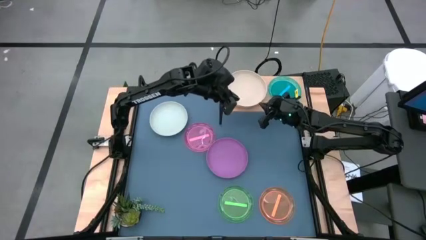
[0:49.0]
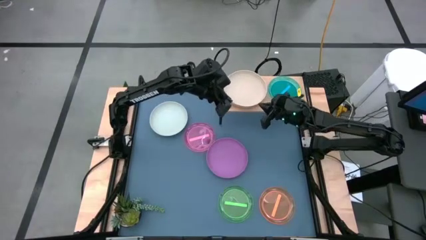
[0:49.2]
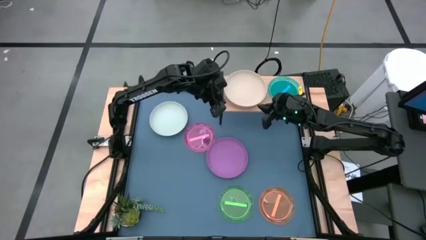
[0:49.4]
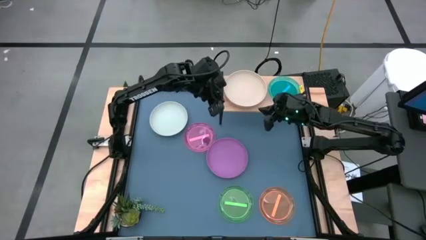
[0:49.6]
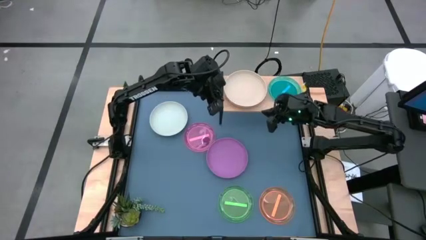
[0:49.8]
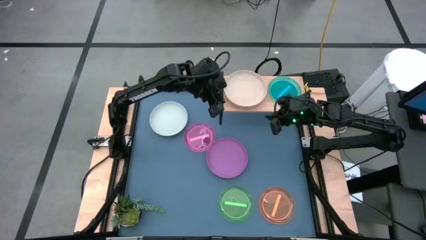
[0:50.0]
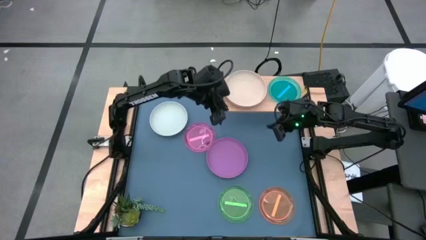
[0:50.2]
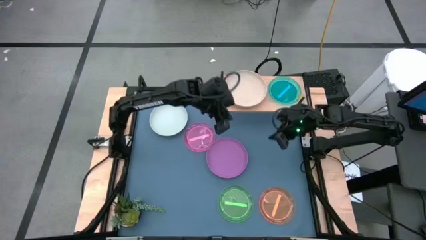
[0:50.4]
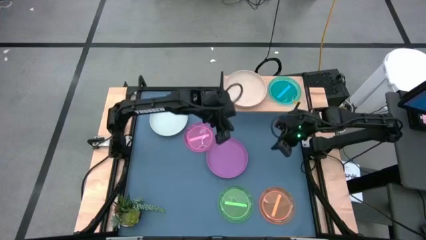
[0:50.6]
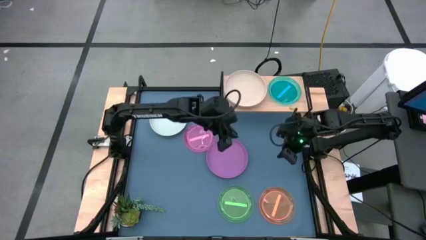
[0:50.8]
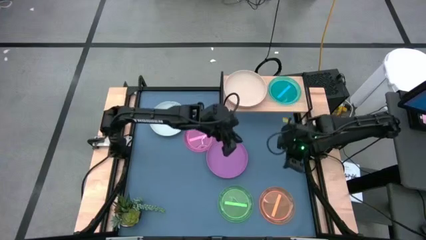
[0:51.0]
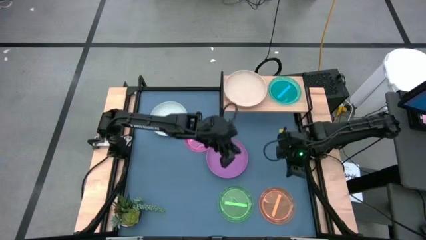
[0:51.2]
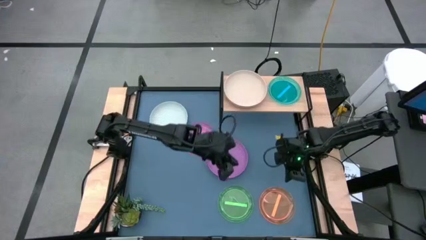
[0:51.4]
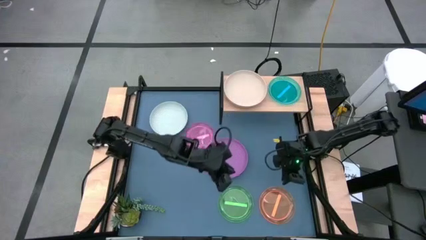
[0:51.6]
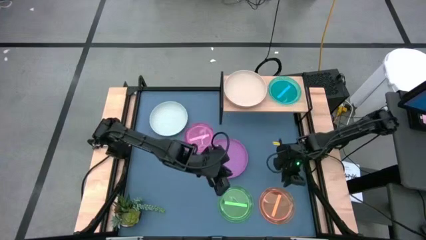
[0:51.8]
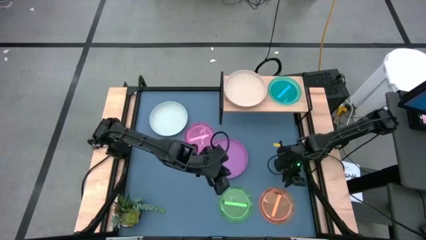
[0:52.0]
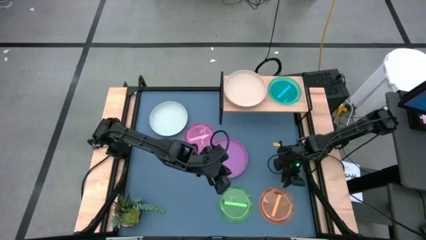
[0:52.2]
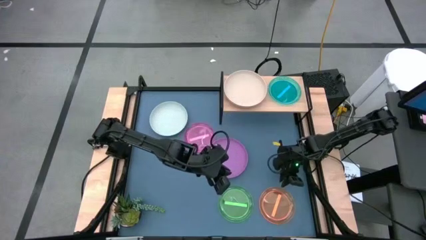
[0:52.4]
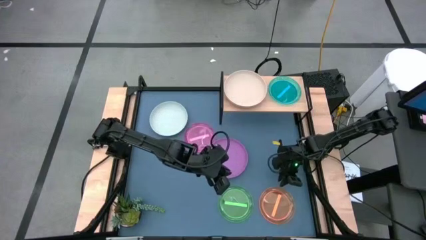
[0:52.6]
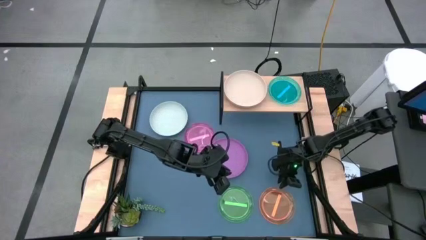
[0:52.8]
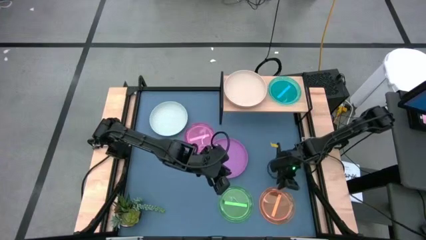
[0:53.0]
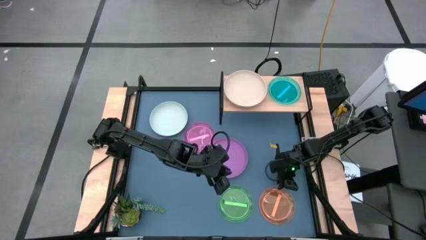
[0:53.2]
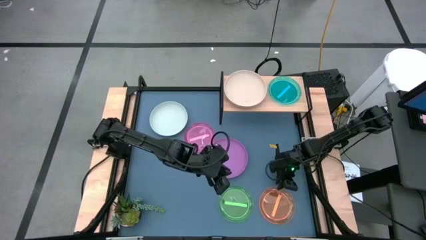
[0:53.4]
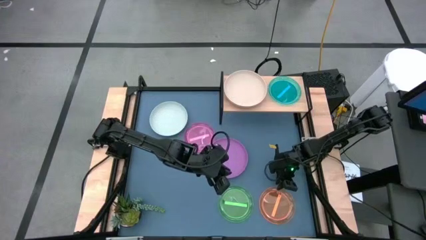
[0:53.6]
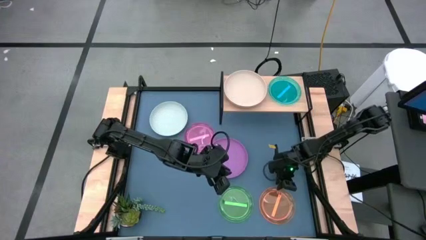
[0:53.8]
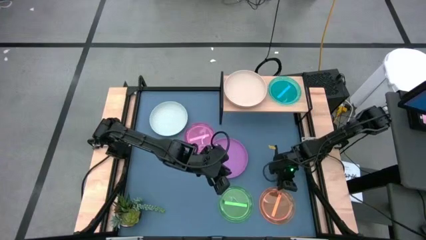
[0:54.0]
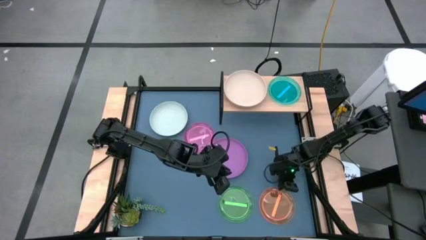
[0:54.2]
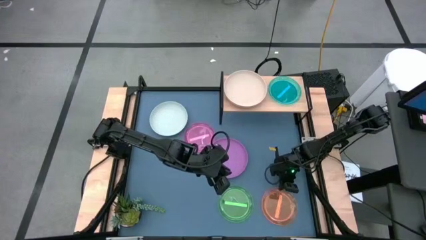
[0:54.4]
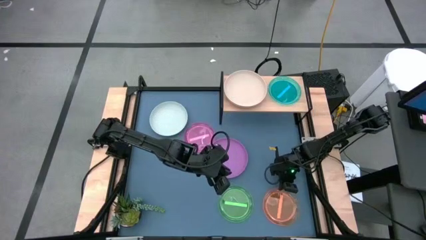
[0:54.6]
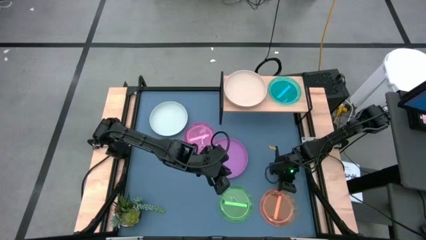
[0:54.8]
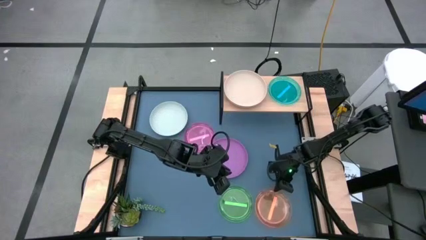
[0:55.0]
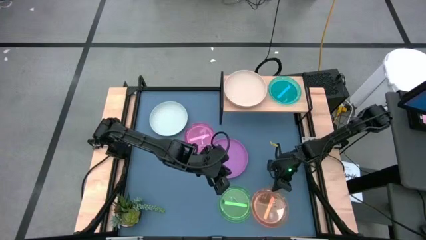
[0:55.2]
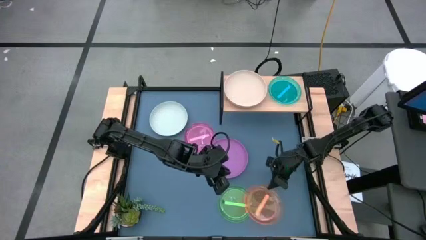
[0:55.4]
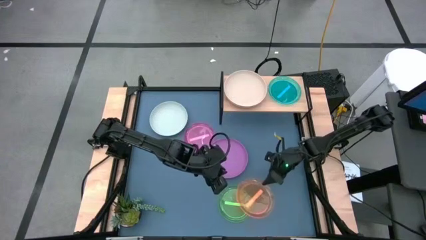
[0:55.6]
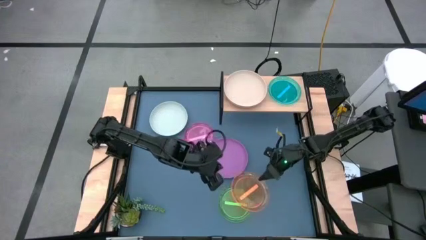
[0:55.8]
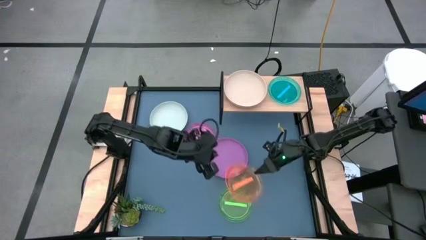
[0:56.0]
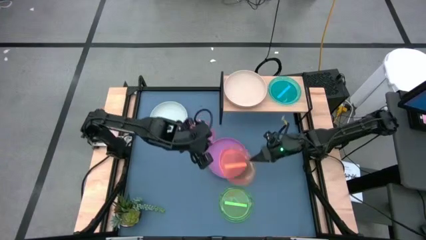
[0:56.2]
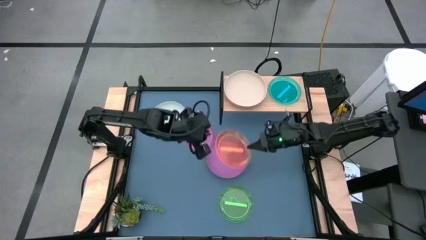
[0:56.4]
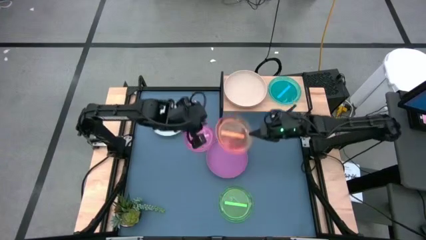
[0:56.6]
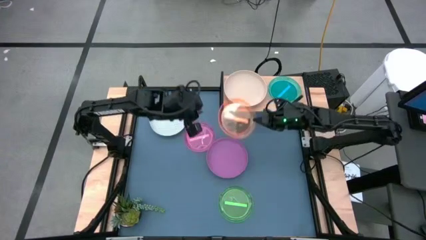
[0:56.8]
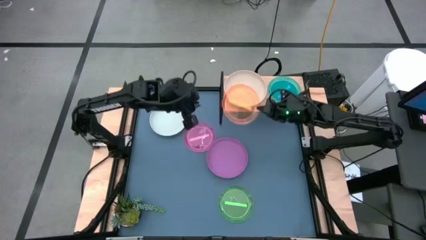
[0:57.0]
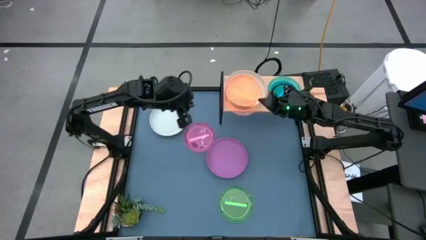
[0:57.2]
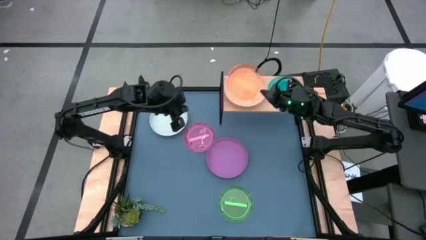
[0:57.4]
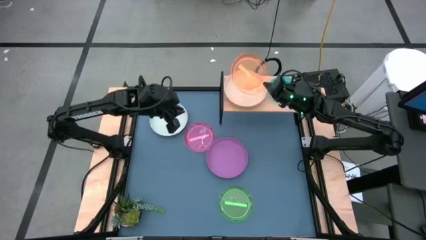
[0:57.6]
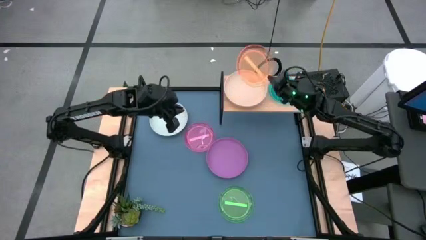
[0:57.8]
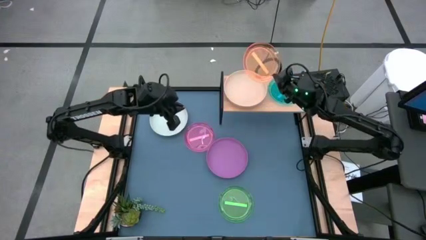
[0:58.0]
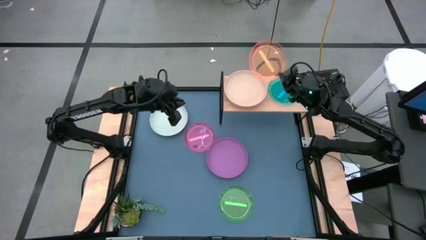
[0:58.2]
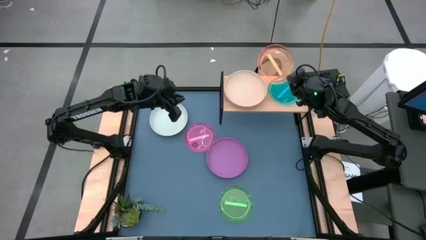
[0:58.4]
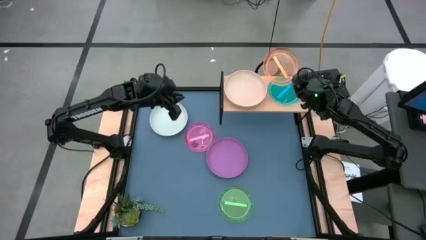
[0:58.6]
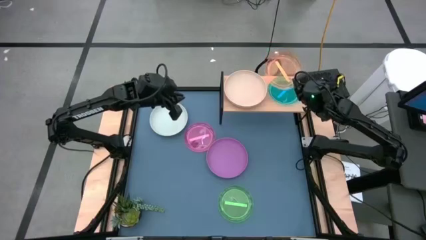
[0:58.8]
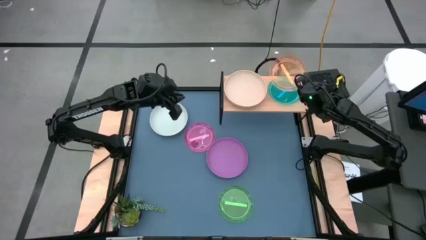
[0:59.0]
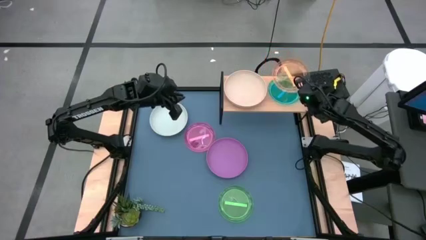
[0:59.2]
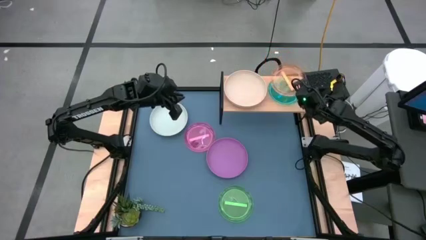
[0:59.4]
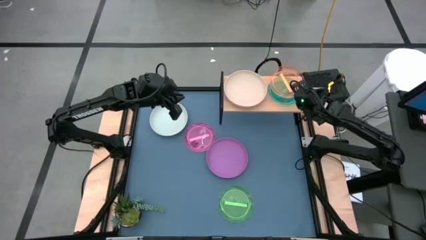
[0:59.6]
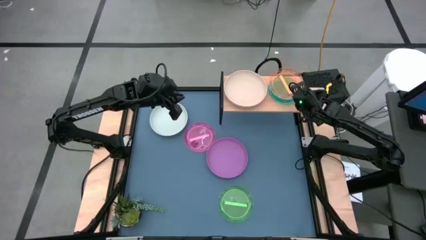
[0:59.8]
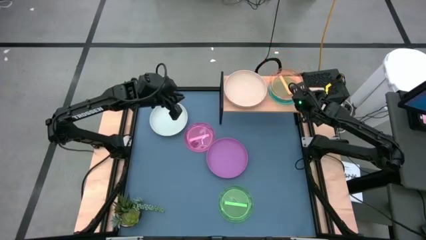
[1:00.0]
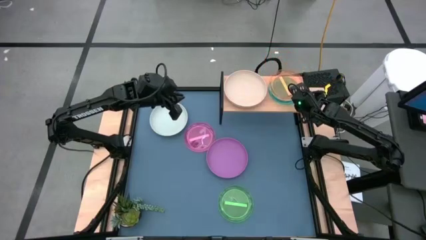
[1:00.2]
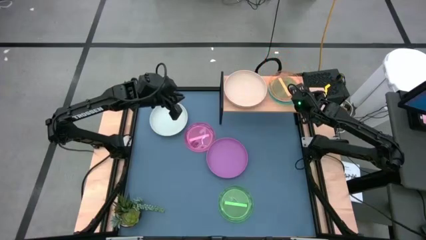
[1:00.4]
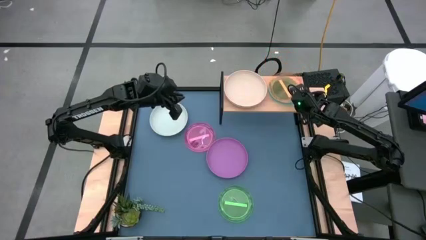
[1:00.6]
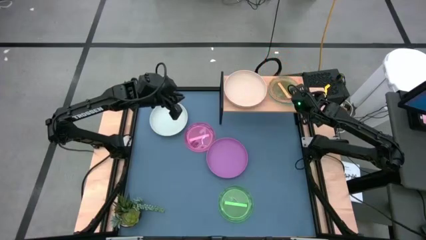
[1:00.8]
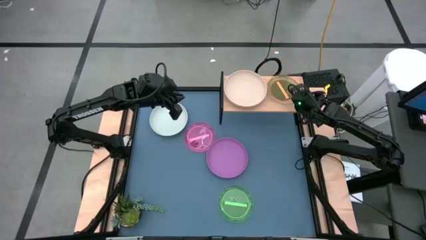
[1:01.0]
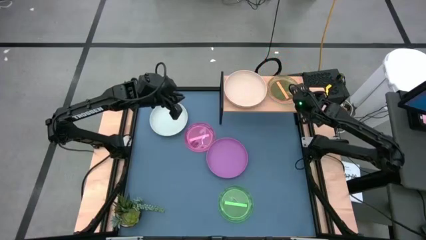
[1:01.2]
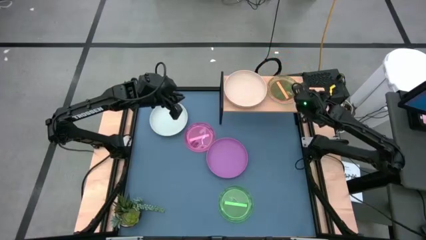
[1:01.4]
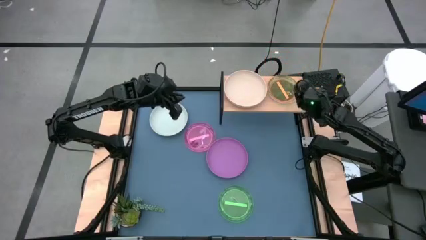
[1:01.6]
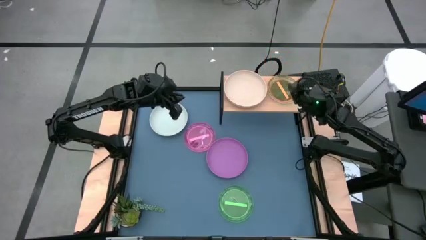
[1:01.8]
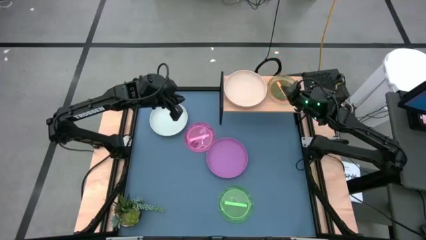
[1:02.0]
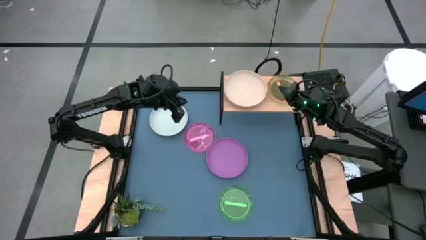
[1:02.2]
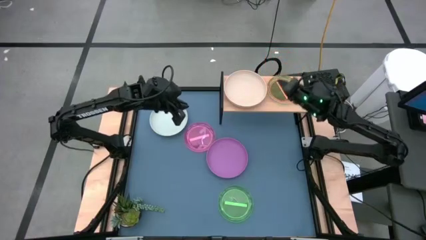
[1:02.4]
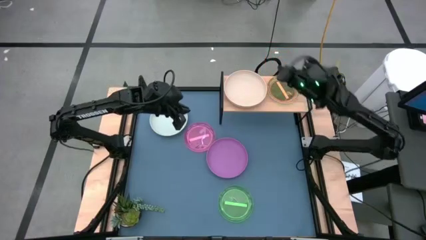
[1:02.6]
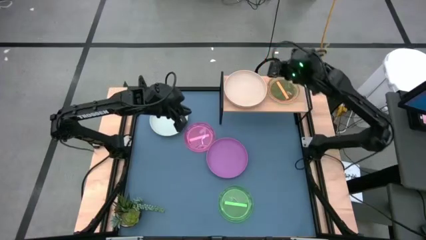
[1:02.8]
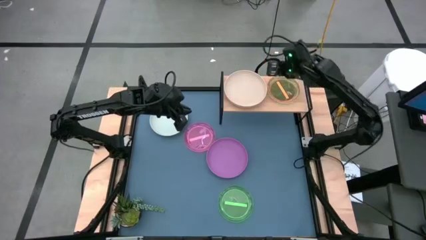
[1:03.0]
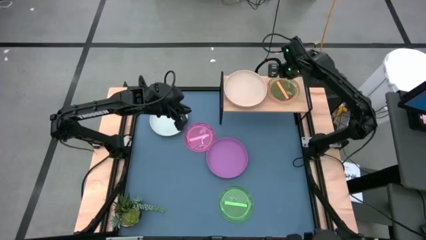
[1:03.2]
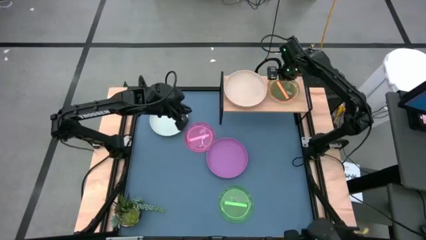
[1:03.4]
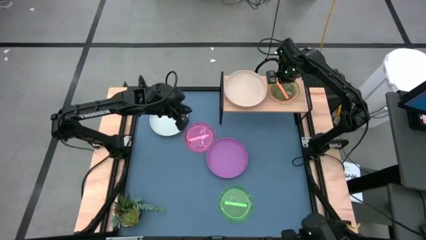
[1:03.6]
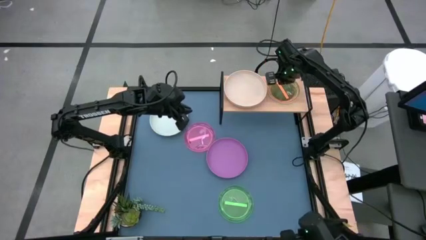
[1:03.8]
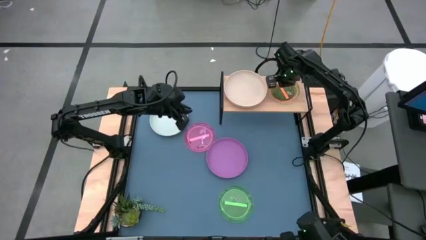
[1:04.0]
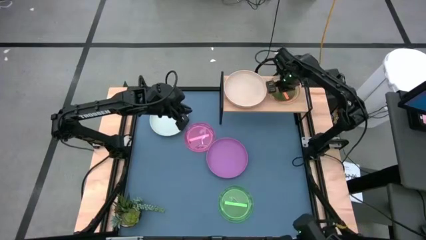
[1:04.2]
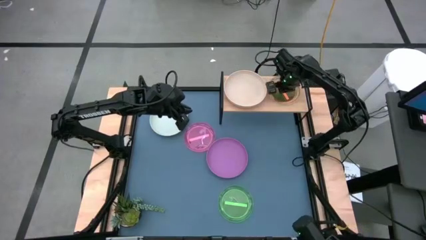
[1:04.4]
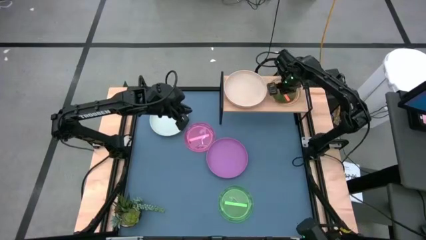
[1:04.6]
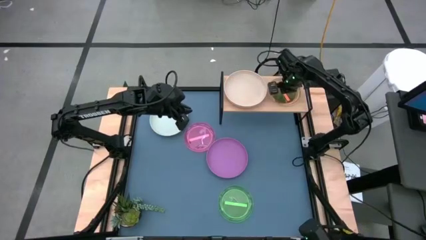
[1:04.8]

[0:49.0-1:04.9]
Task: Place and stack plates onto a shelf
Stack the small orange plate on the small blue plate on the shelf
